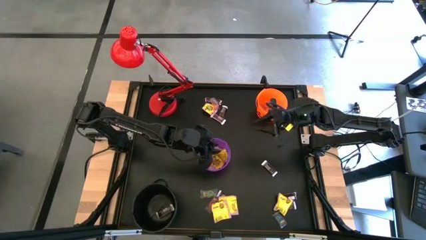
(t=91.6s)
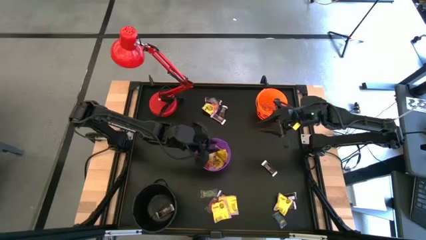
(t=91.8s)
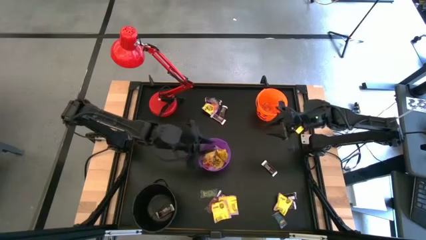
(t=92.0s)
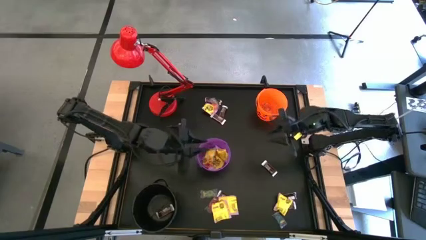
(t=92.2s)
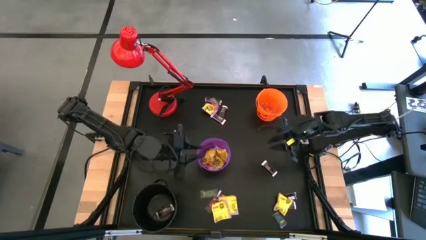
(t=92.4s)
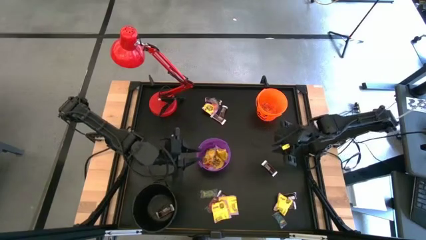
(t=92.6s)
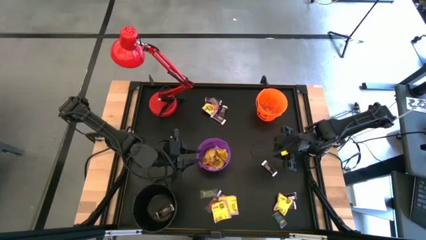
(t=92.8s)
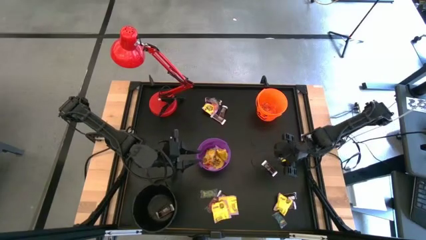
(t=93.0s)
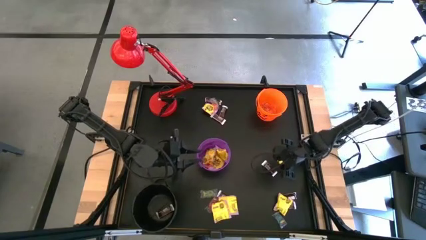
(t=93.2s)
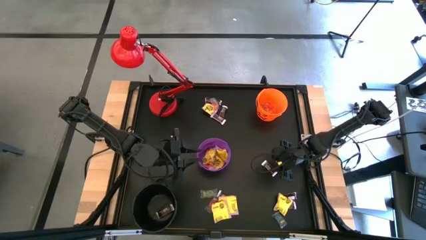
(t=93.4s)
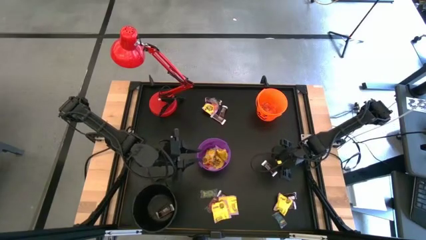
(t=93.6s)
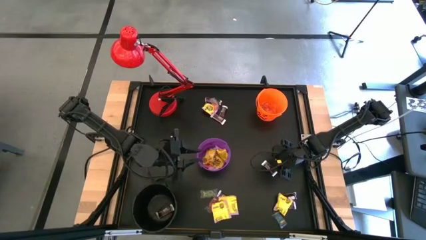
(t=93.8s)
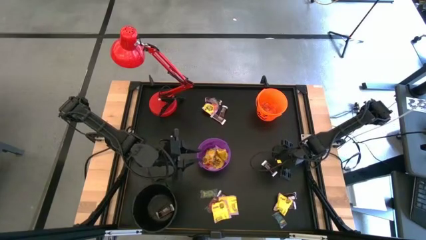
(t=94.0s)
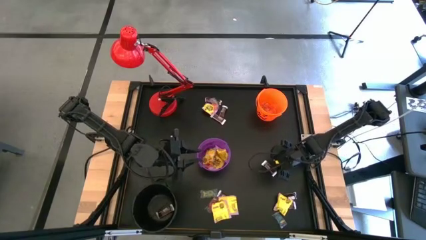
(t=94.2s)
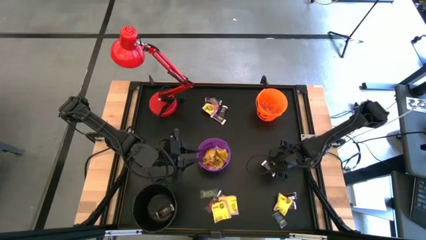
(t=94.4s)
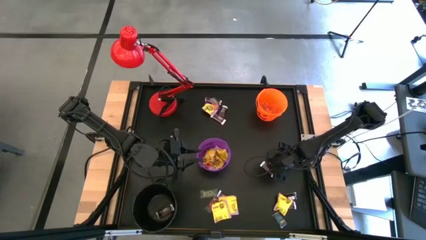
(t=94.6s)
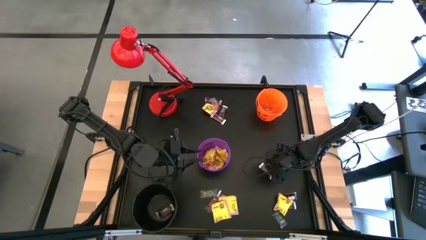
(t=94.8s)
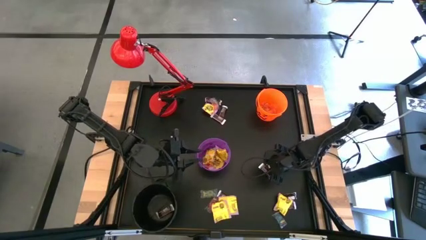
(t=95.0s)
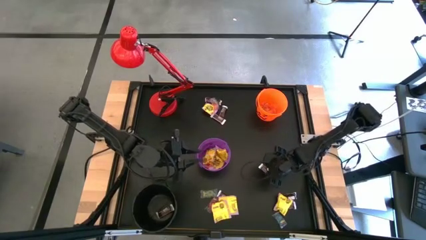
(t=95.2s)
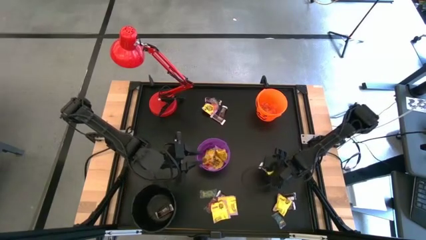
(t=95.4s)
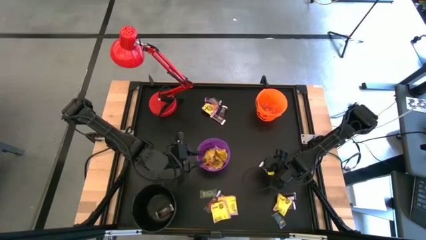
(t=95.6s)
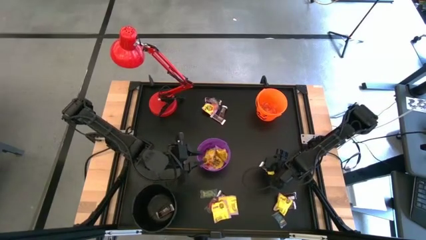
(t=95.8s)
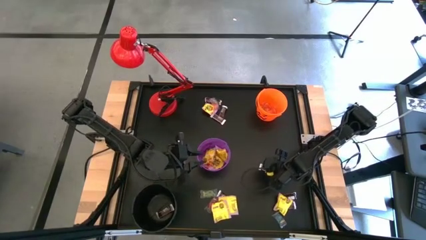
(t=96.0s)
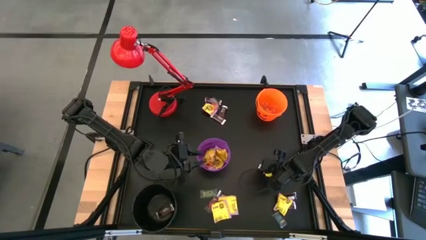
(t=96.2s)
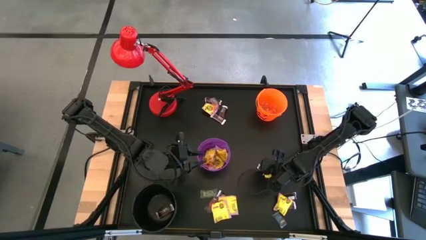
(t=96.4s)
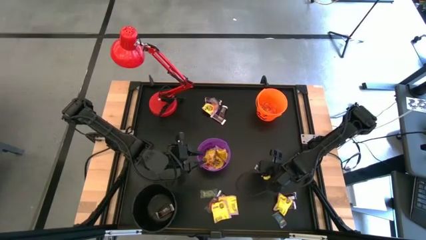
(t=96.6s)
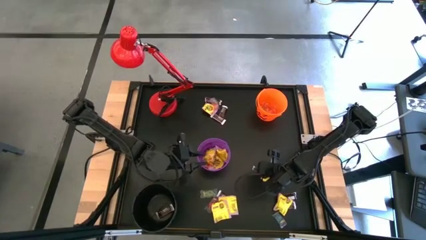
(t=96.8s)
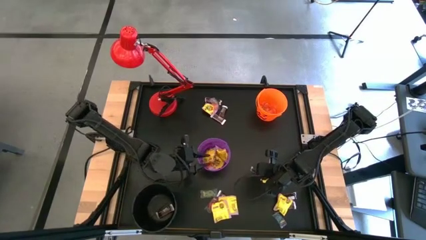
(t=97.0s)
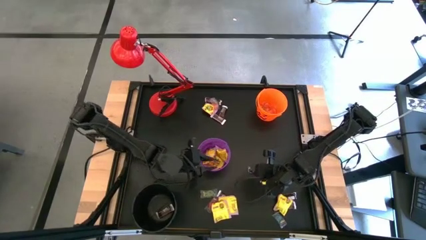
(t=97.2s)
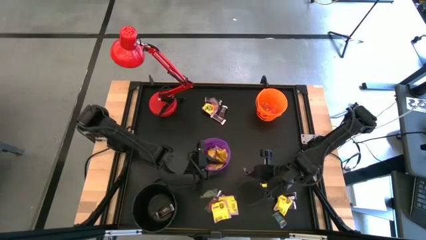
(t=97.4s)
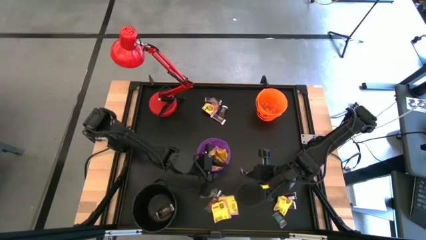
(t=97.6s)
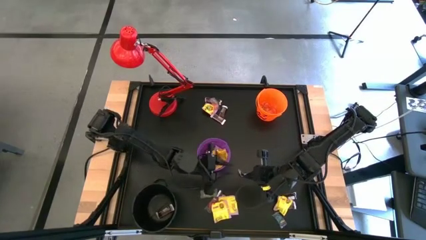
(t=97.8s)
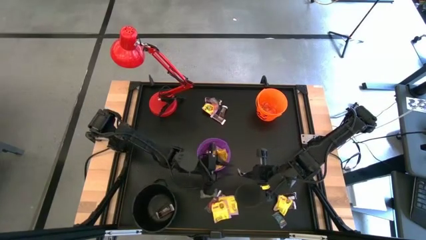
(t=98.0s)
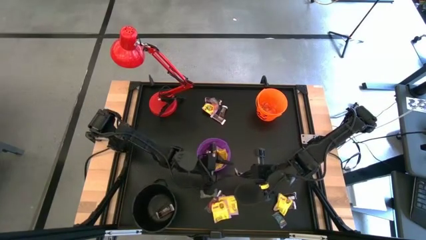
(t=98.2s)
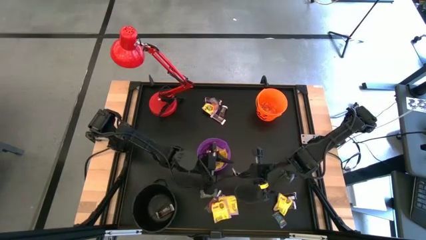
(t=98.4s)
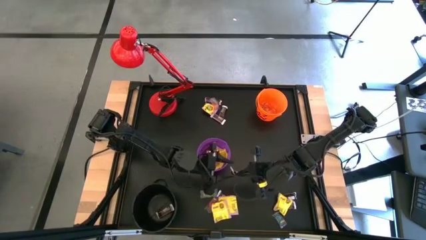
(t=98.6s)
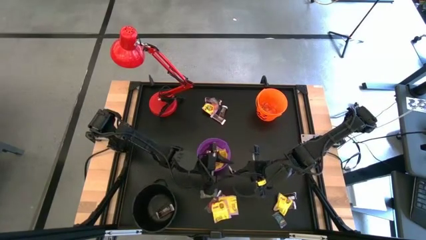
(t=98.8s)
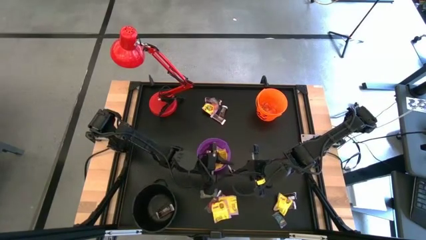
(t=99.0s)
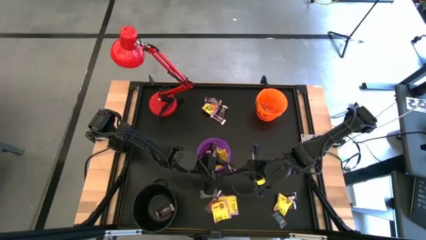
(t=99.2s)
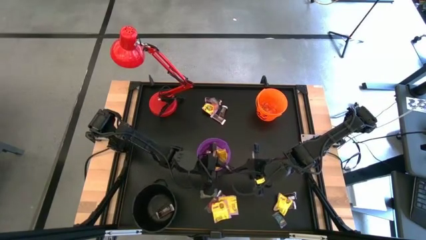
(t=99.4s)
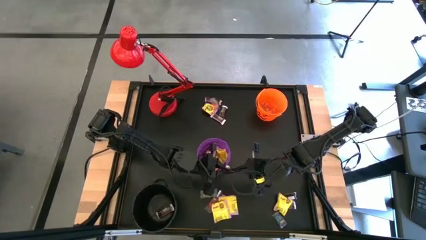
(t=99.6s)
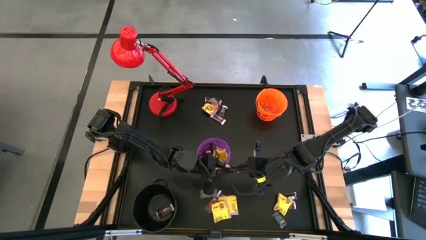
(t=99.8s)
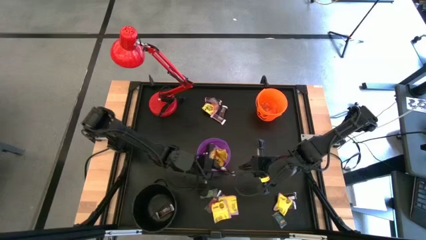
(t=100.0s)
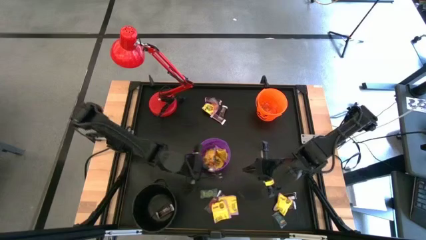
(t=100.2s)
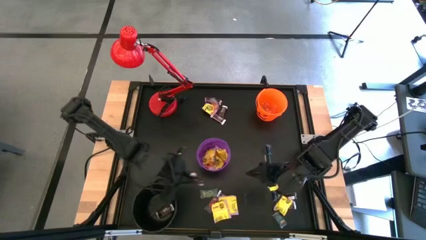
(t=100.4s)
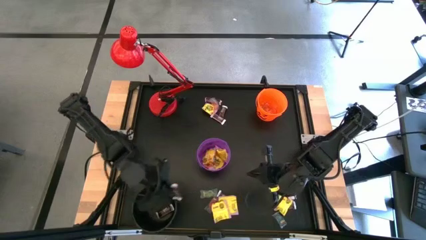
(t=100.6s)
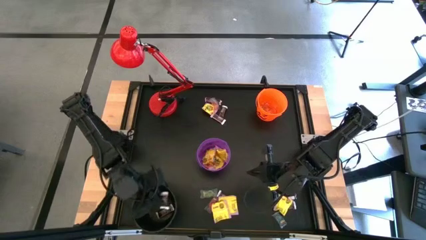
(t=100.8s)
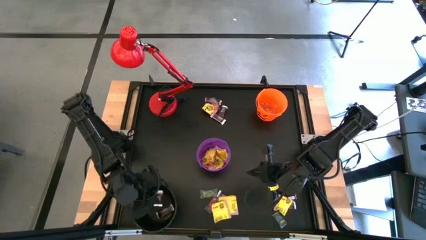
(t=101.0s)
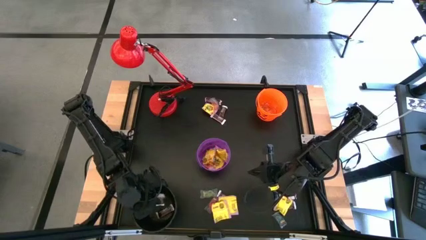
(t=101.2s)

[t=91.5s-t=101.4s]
Task: Sort candy
Put the brown chocolate bar into the black bucket

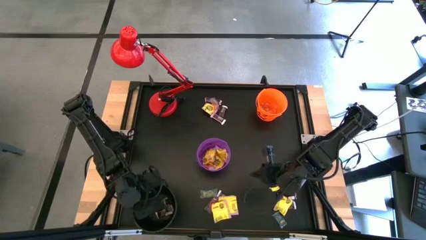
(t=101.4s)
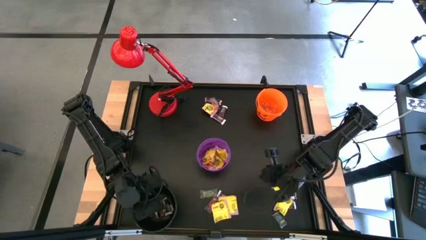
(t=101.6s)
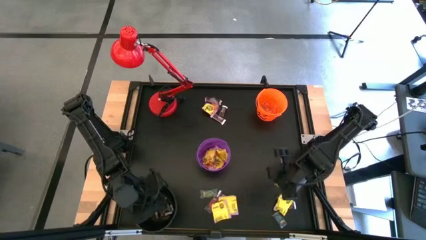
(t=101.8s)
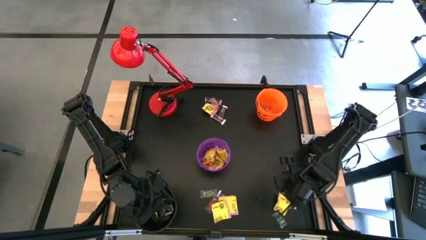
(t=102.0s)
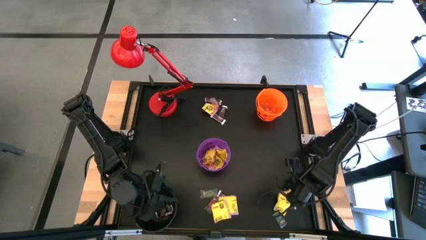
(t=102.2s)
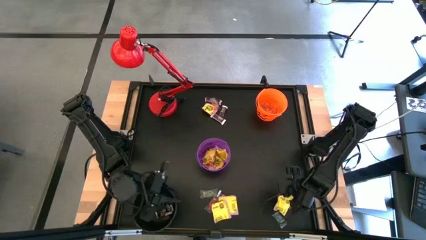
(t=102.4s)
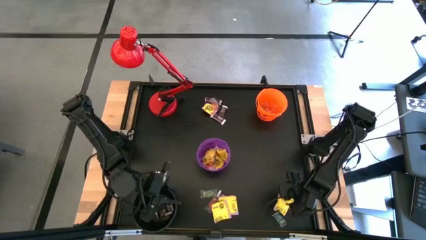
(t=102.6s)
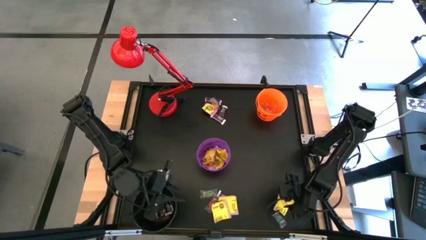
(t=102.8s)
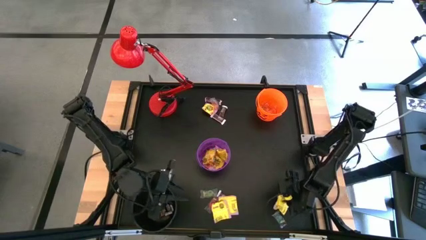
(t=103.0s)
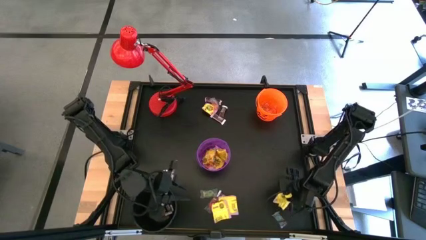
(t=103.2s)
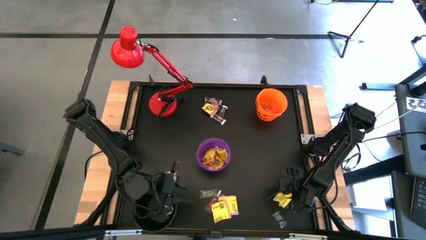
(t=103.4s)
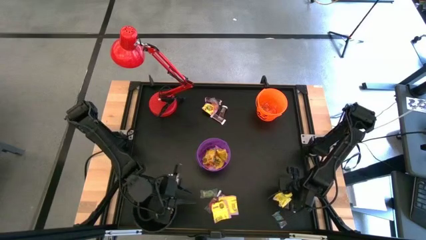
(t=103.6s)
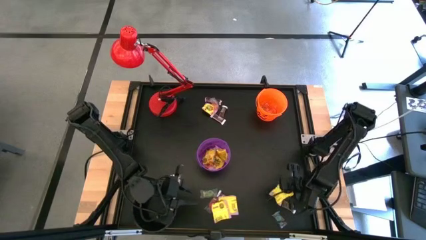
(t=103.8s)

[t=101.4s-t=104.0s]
Put the yellow candy into the purple bucket

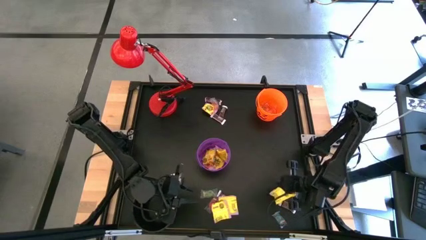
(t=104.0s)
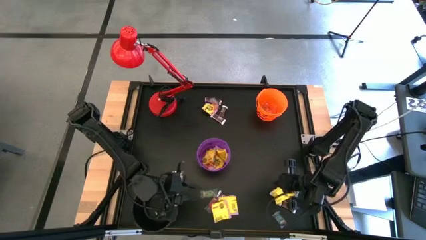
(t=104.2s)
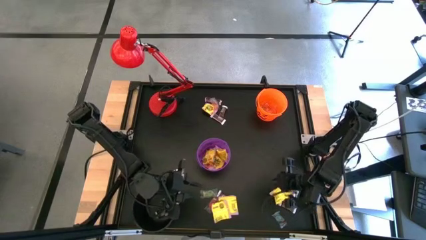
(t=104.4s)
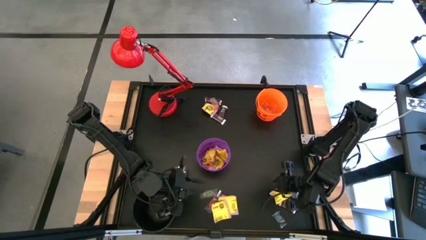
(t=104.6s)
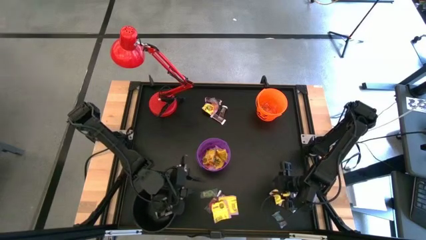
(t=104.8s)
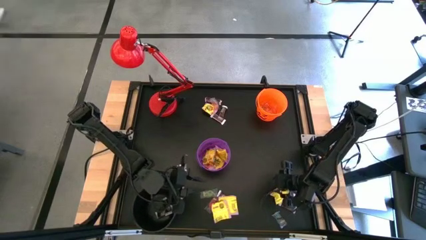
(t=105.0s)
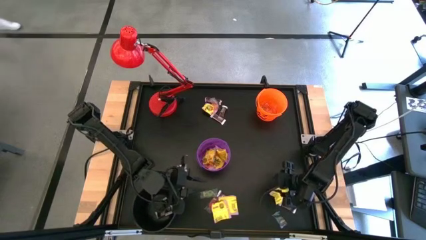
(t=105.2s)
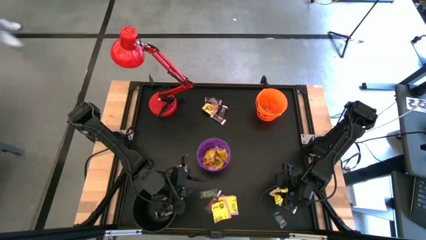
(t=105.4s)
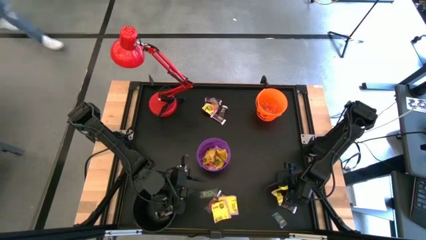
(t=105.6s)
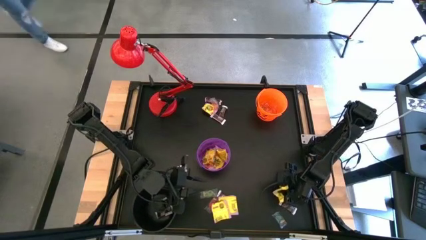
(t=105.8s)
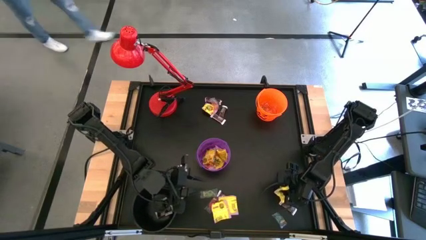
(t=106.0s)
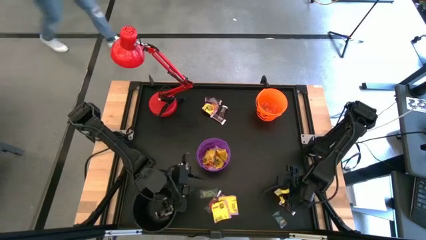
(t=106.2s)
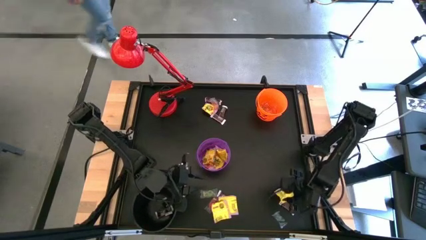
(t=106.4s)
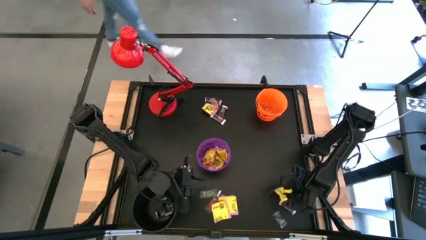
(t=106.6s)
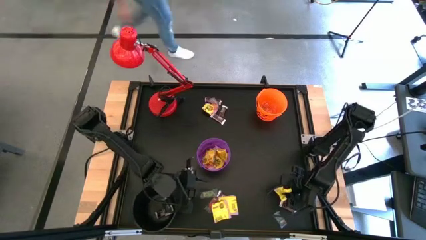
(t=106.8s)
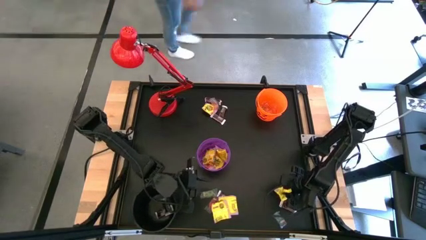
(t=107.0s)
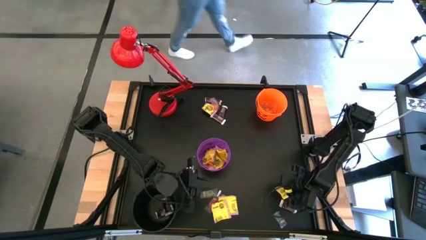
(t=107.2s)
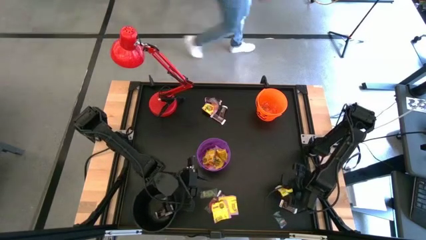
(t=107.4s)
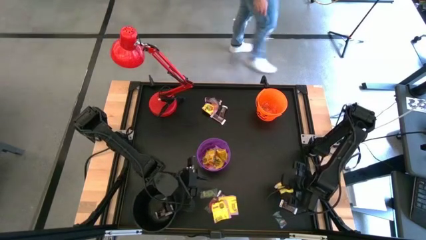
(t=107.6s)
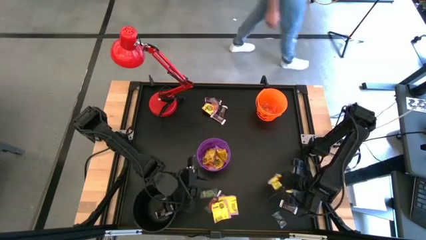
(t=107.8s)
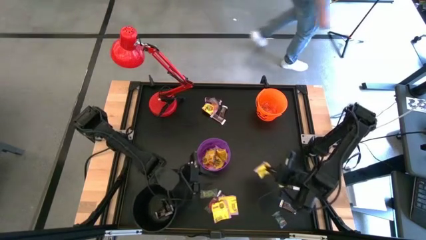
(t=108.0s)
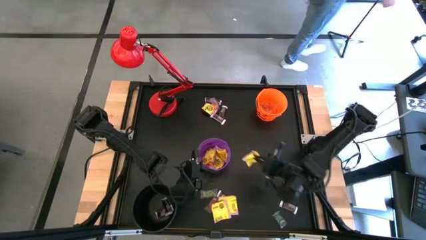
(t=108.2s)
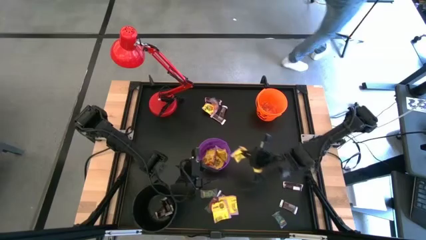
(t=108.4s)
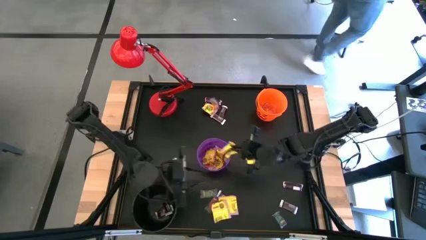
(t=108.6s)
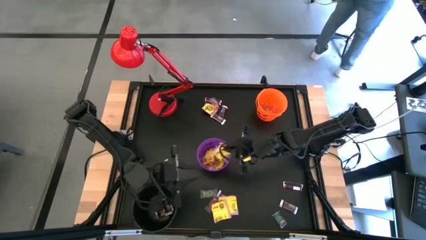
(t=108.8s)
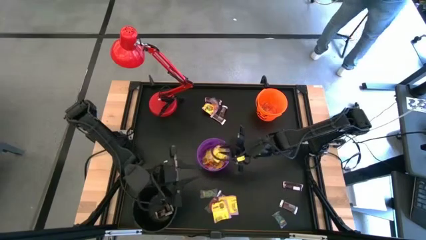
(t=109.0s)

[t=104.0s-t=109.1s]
Put the yellow candy into the purple bucket
